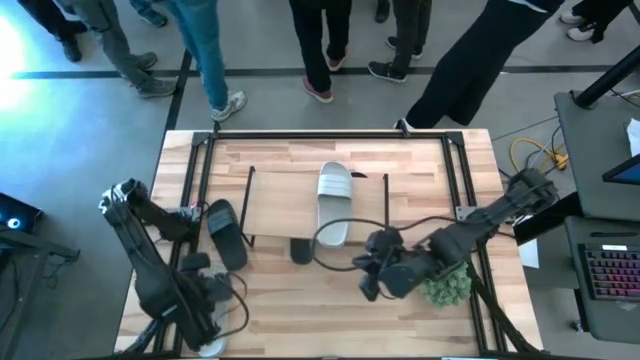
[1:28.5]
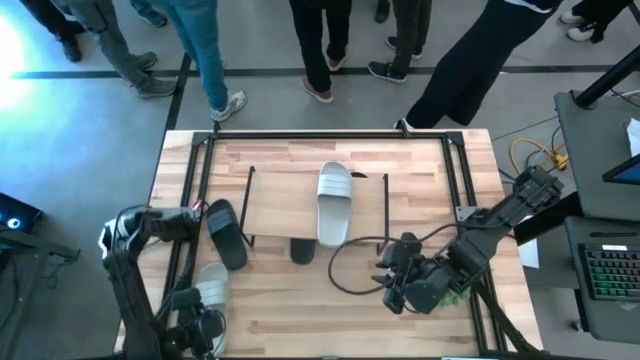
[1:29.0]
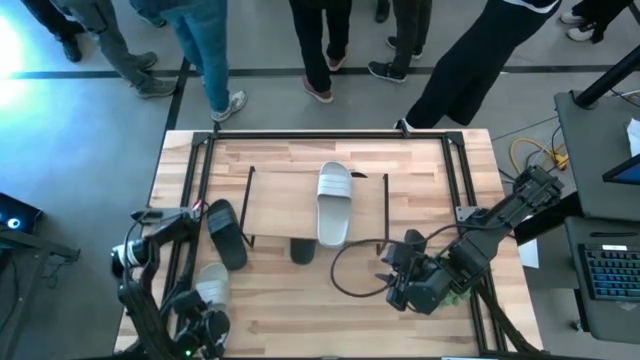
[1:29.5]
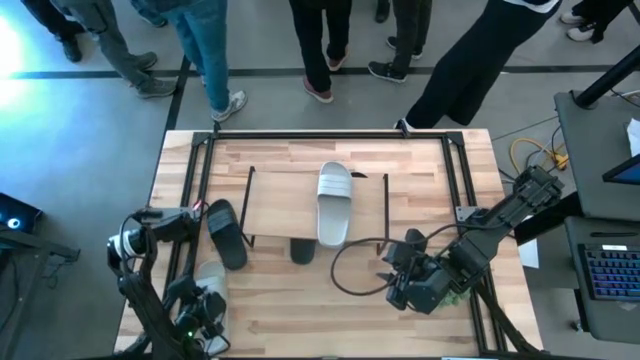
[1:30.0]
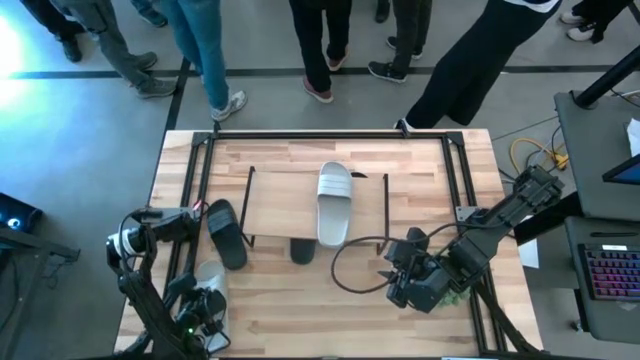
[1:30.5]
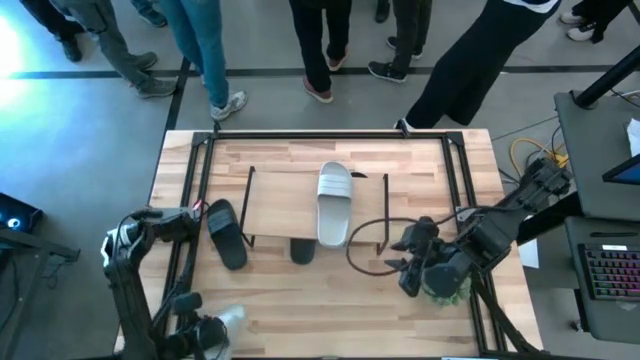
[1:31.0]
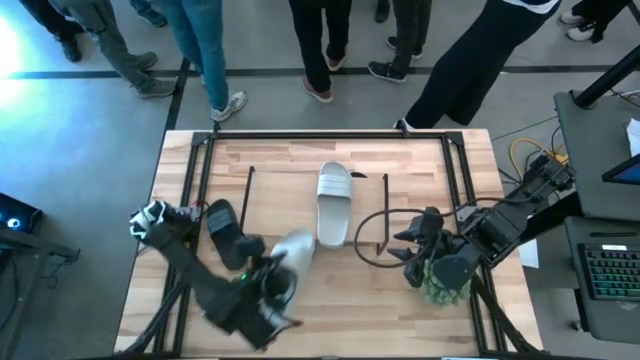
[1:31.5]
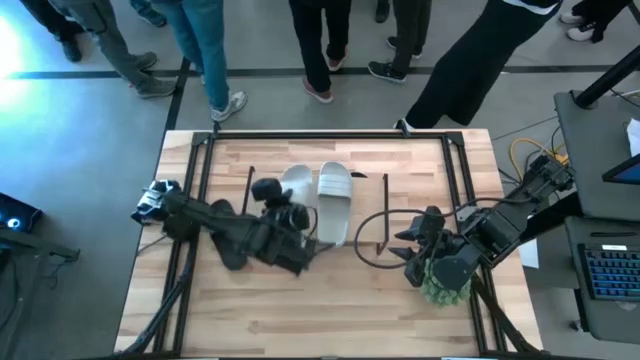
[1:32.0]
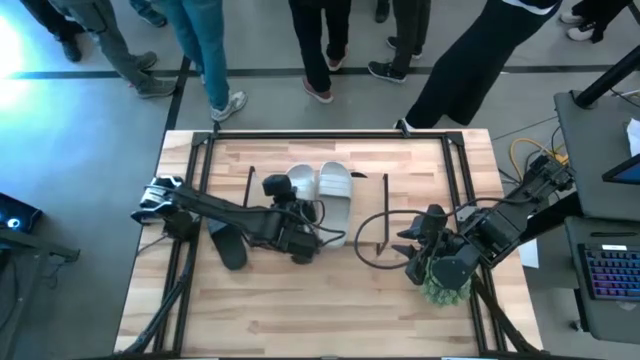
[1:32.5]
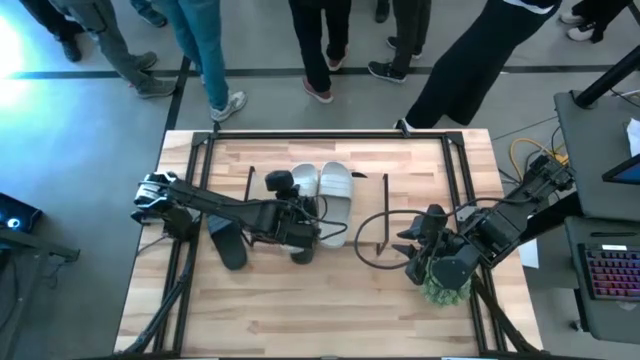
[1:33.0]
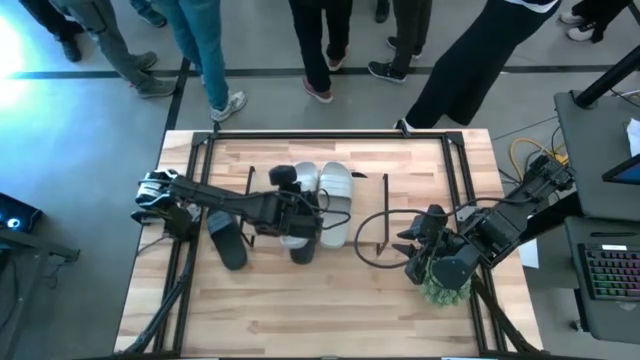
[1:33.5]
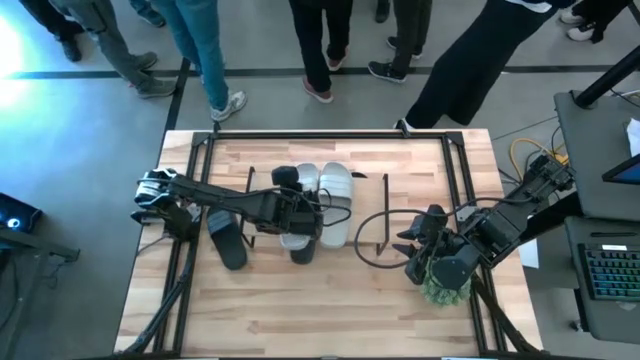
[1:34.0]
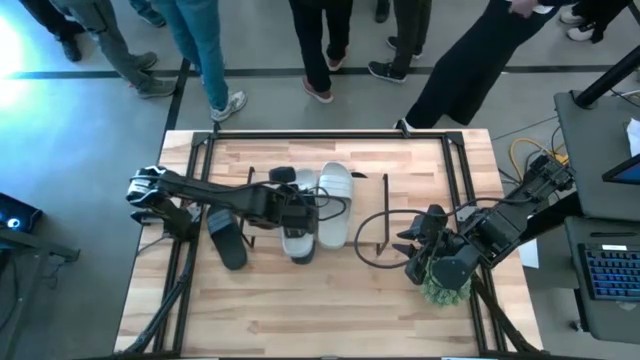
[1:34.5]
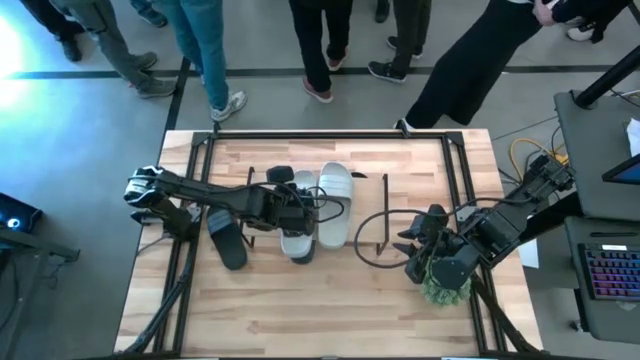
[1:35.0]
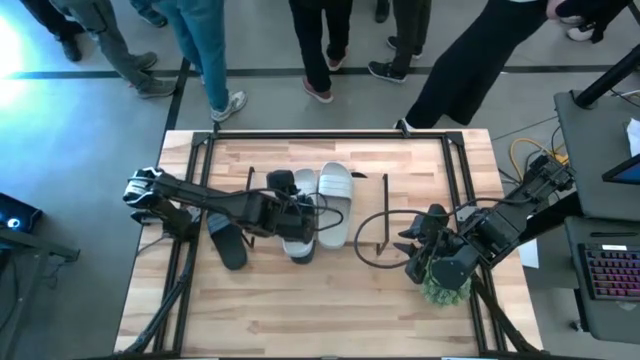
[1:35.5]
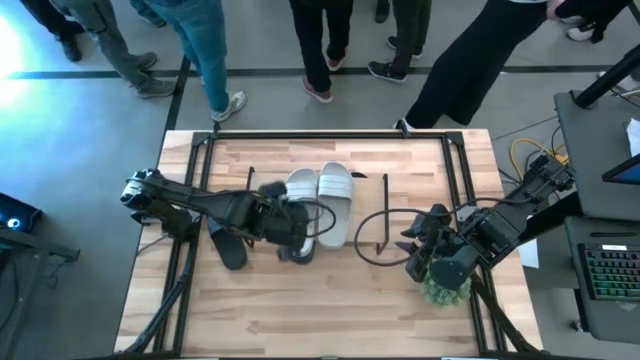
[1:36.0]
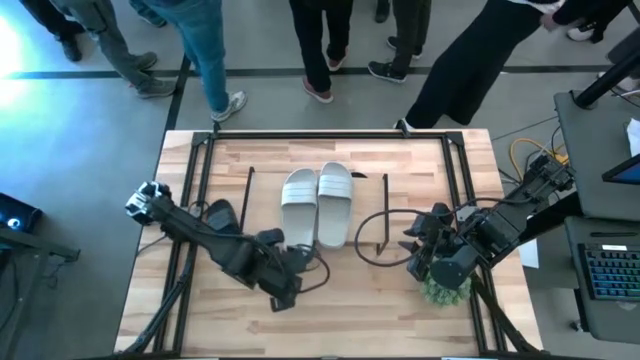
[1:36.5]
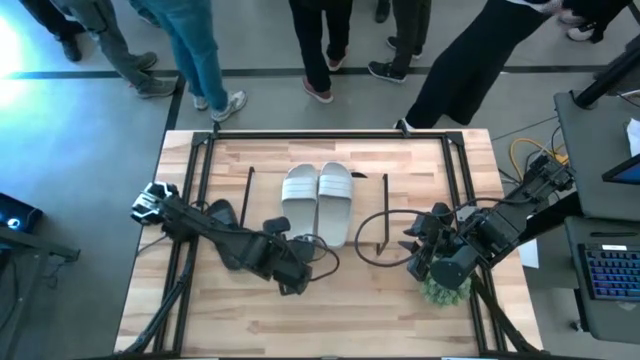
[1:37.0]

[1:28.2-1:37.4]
Task: Pick and place slides into the shelf
Put the gray slide on the shelf

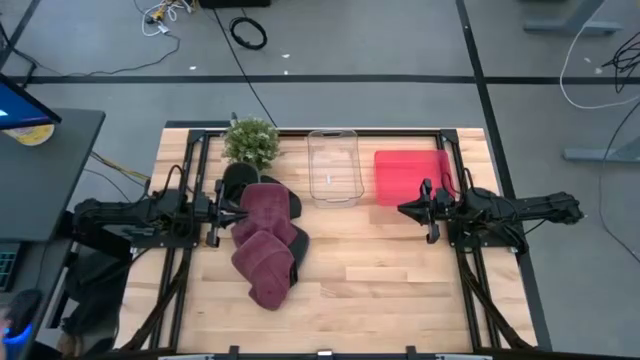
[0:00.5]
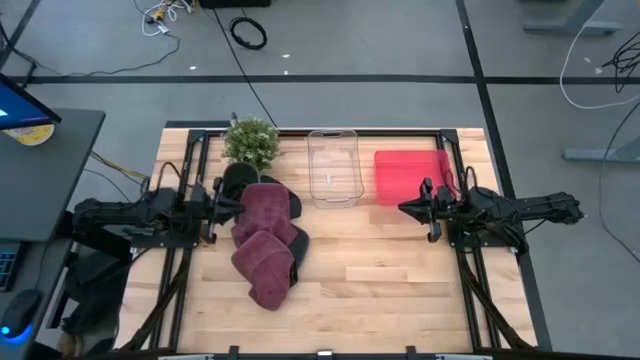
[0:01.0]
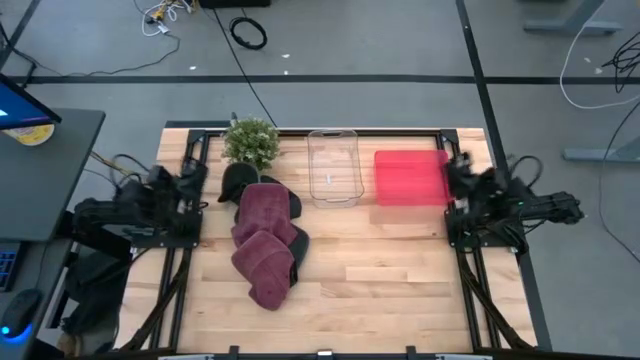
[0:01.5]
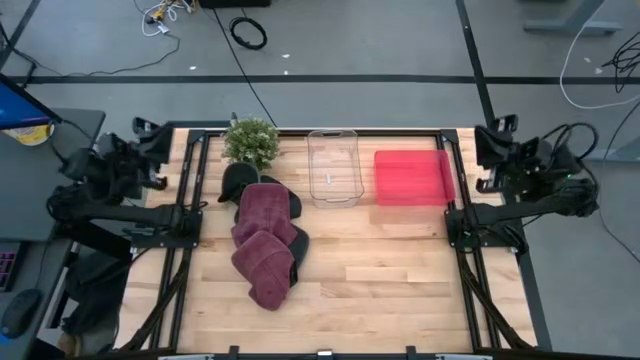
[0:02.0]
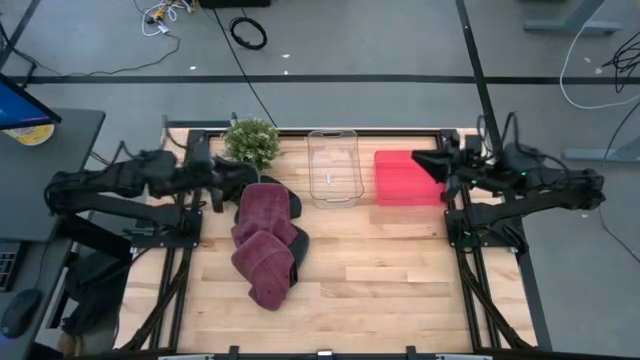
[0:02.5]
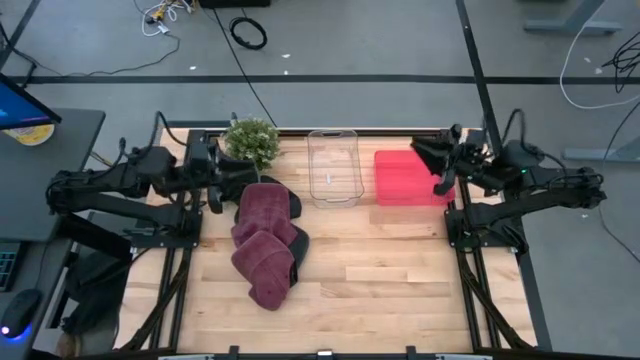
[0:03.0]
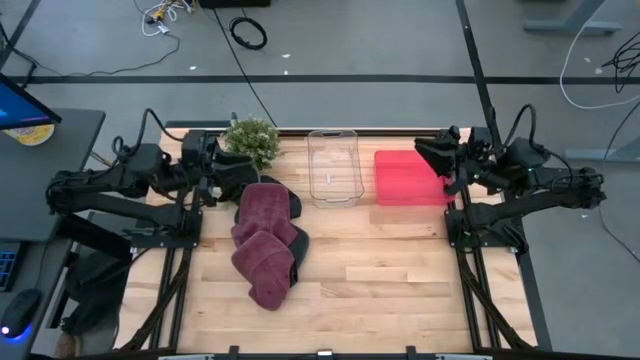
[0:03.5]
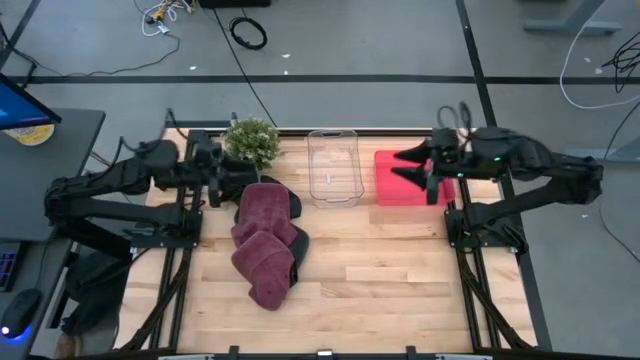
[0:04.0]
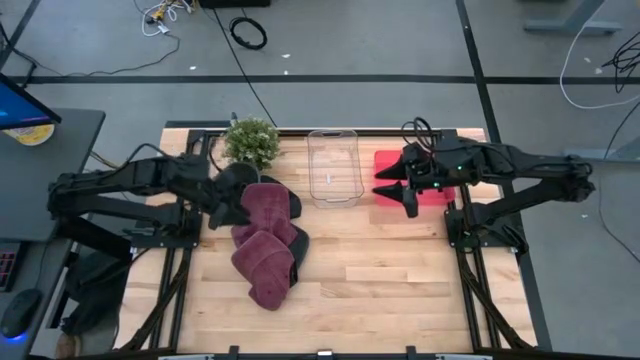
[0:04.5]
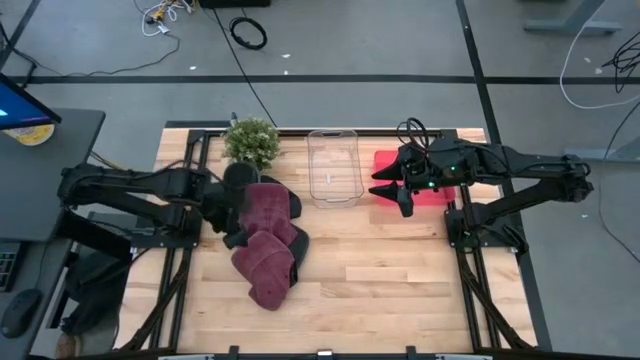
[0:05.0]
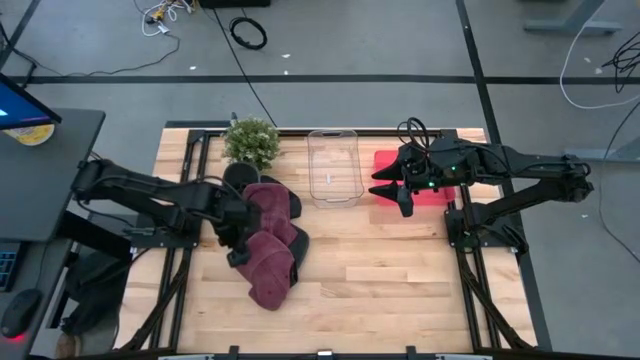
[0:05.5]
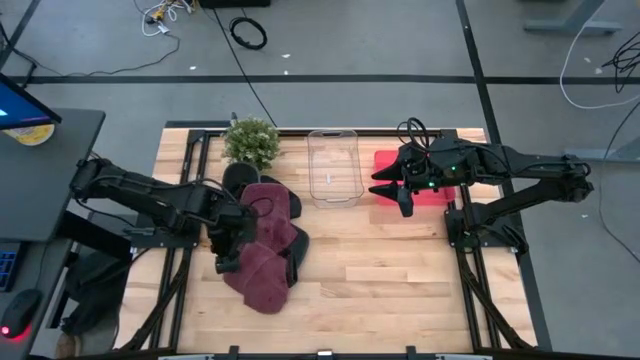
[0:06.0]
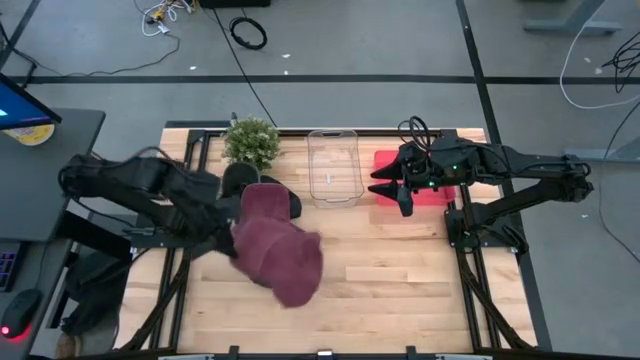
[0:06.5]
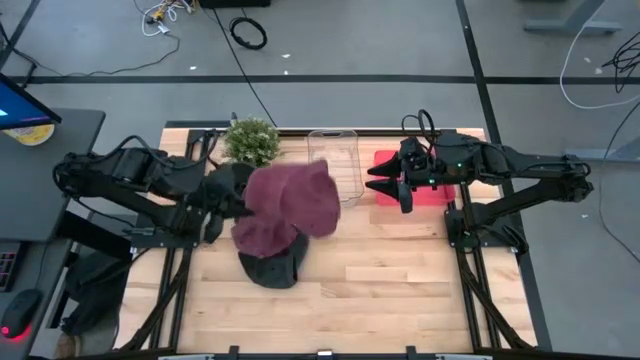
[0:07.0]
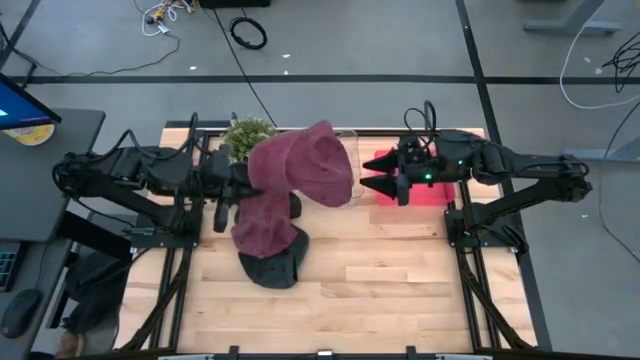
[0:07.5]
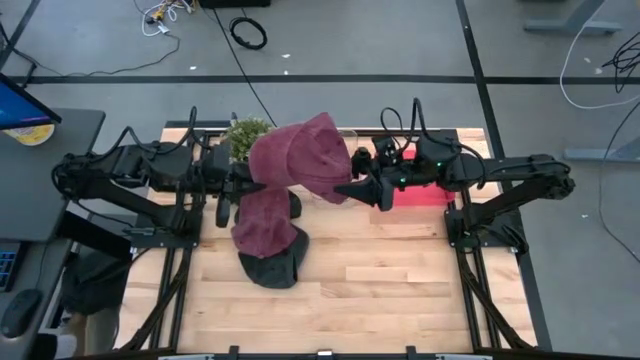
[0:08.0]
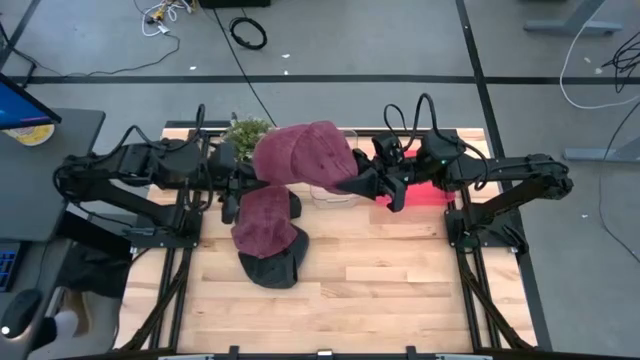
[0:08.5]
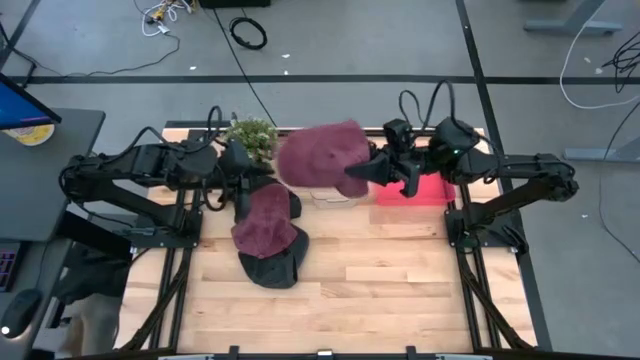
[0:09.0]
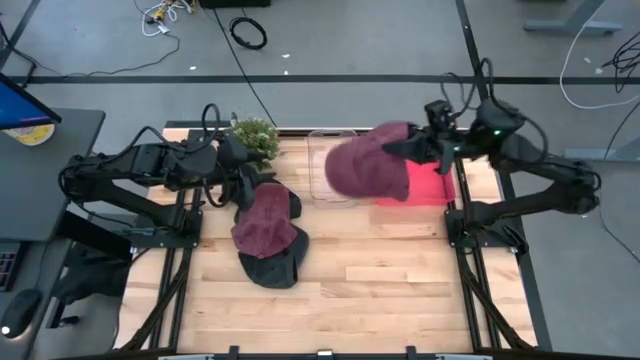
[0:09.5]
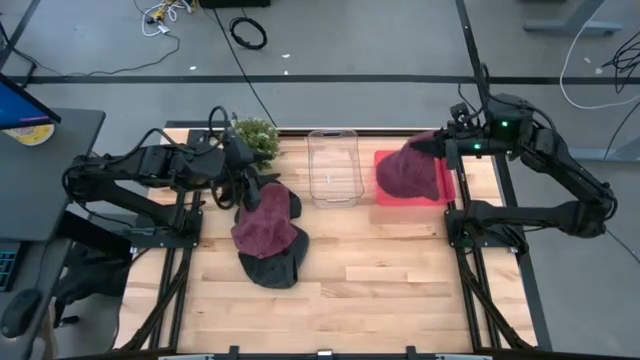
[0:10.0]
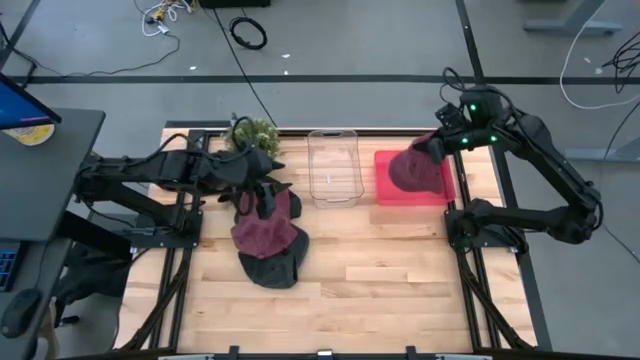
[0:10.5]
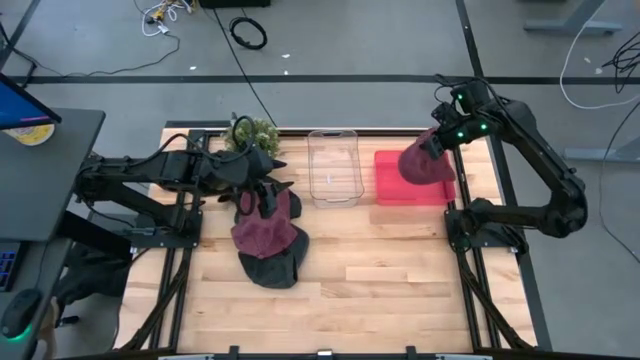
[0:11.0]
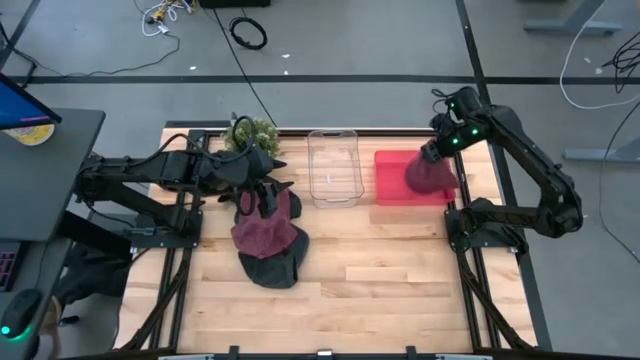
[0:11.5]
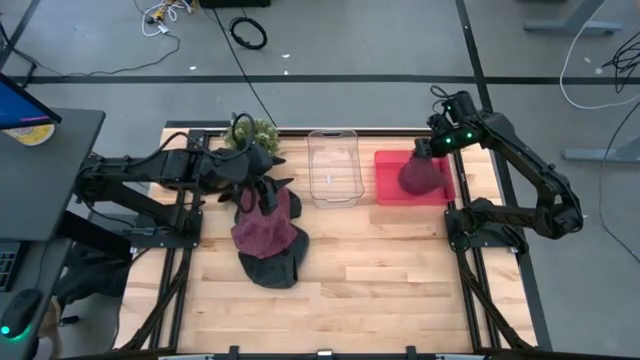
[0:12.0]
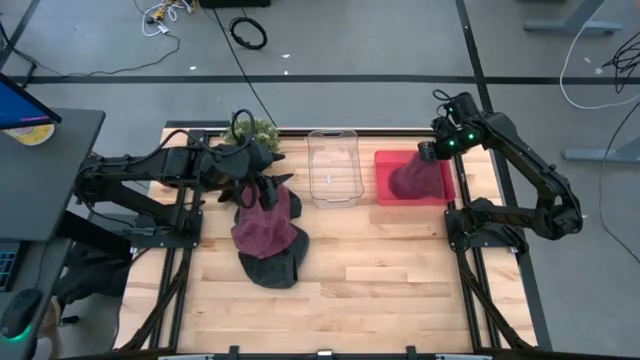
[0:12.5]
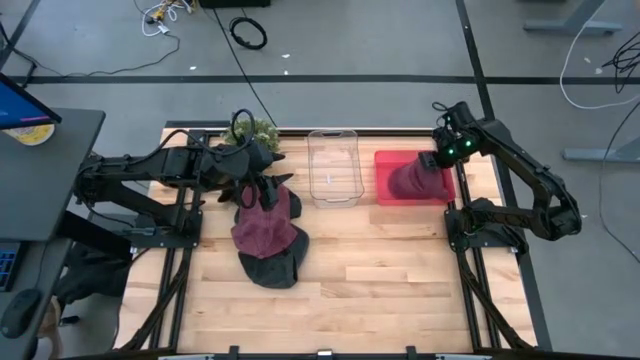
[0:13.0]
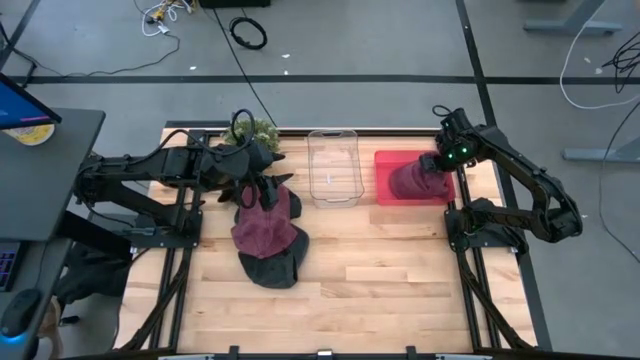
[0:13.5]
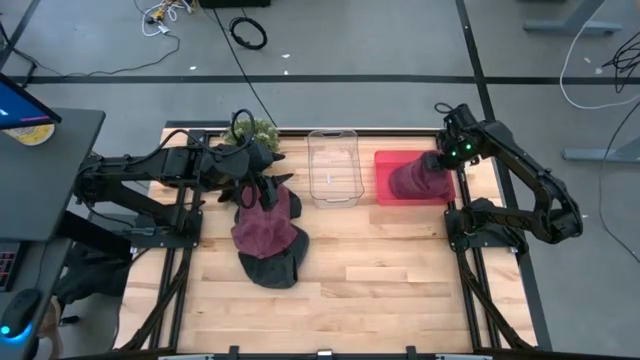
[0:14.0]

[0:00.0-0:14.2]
Task: Pick & Place hat
Put the bottom red cap into the red bin
